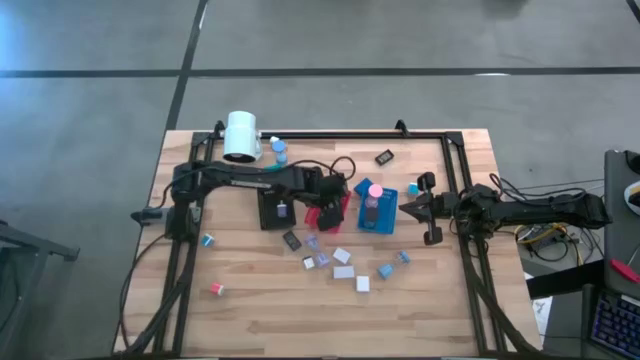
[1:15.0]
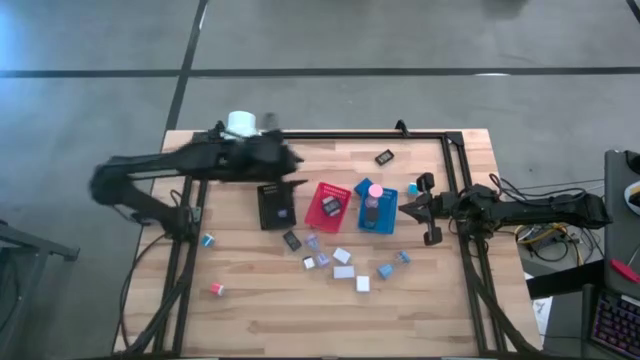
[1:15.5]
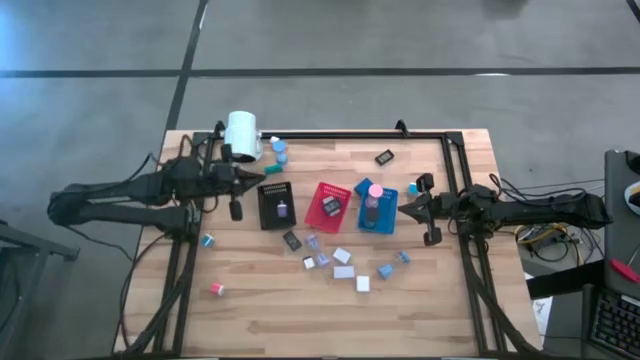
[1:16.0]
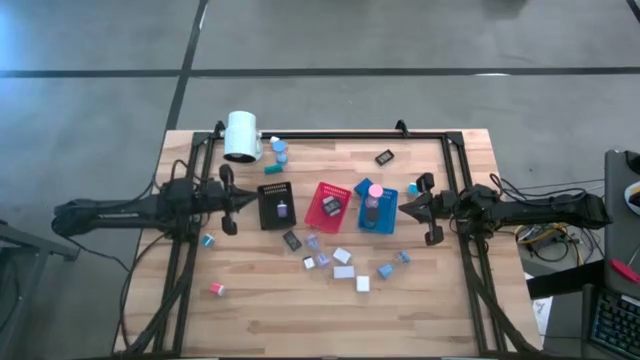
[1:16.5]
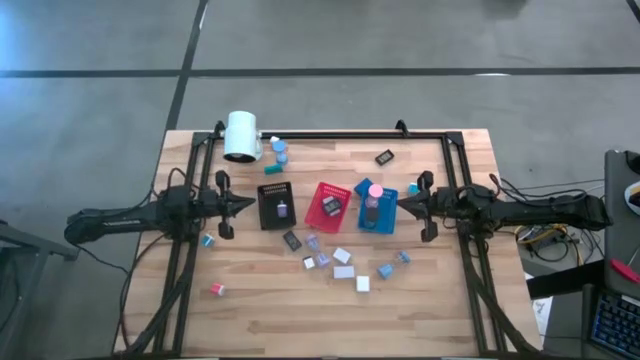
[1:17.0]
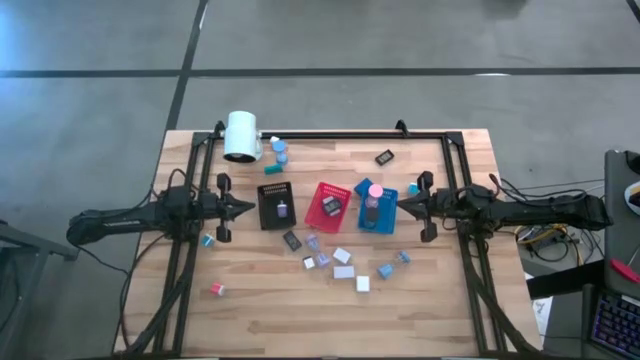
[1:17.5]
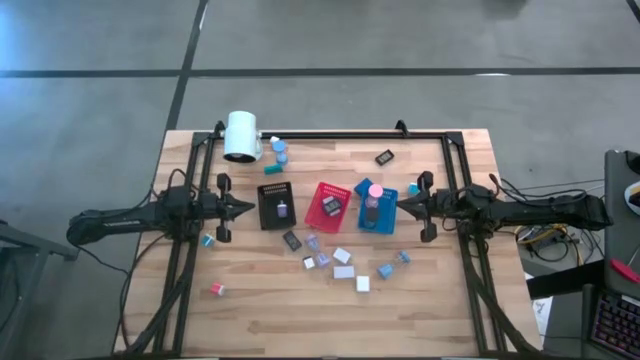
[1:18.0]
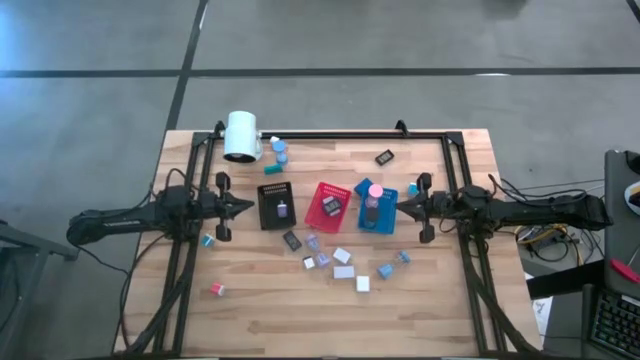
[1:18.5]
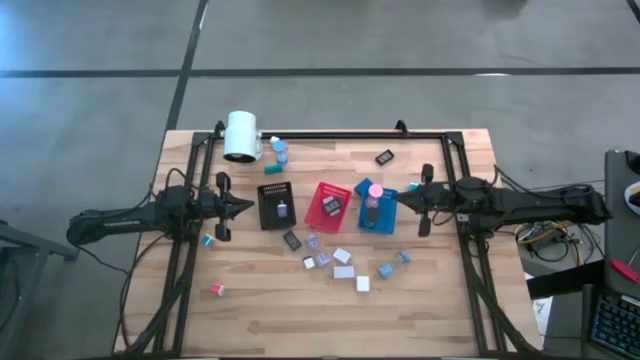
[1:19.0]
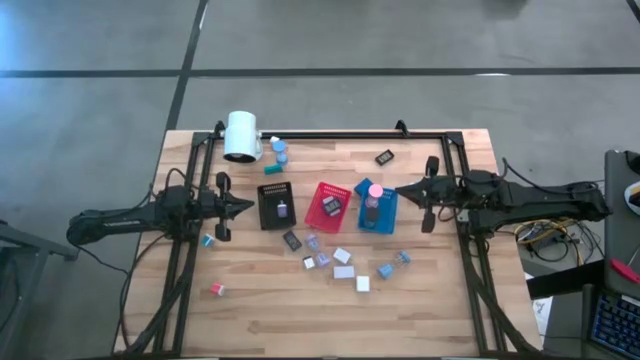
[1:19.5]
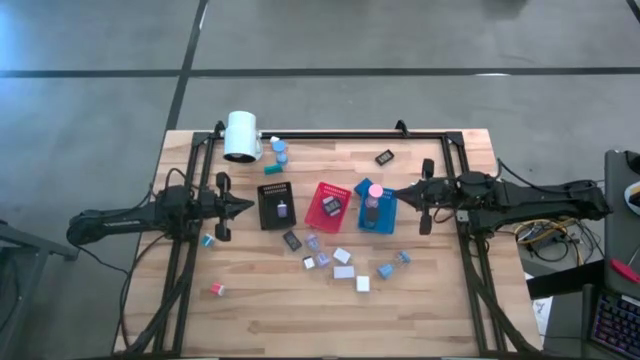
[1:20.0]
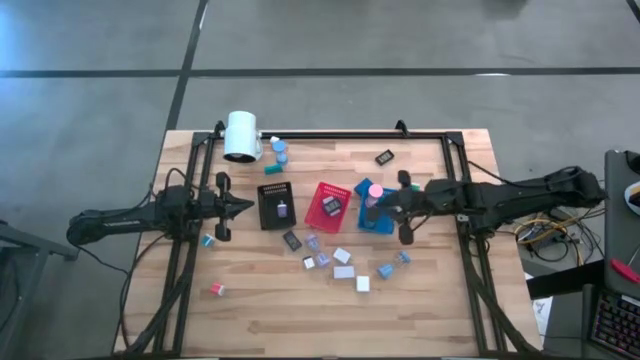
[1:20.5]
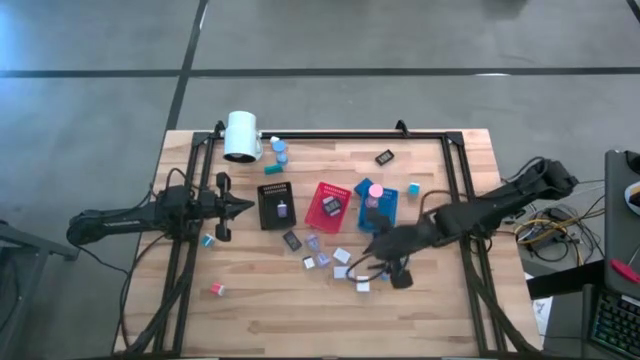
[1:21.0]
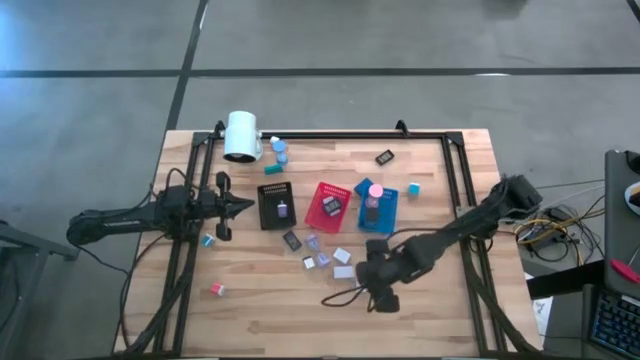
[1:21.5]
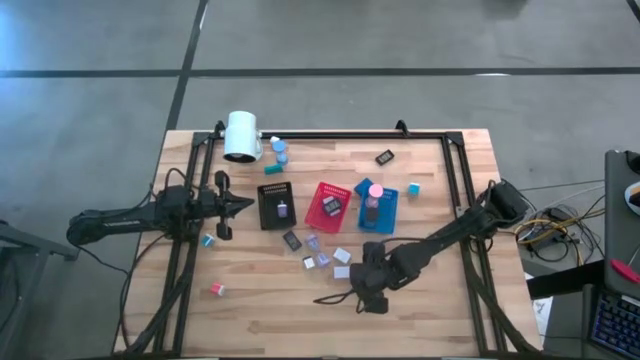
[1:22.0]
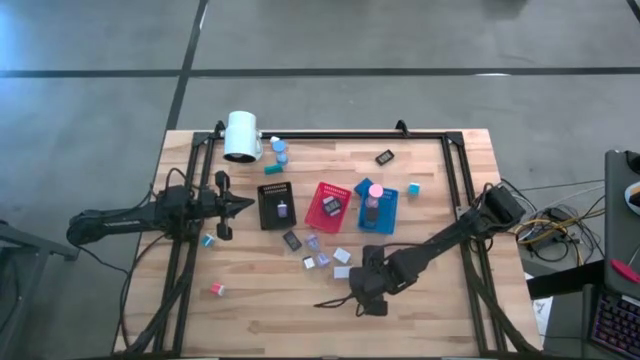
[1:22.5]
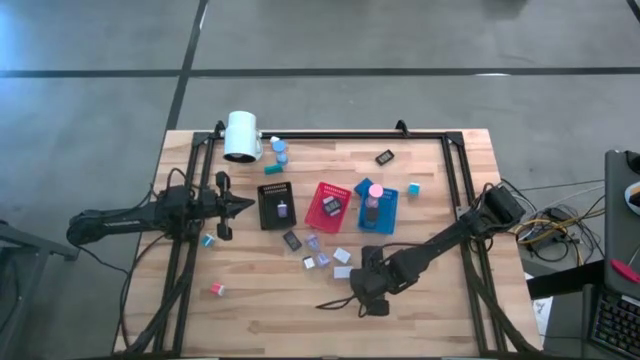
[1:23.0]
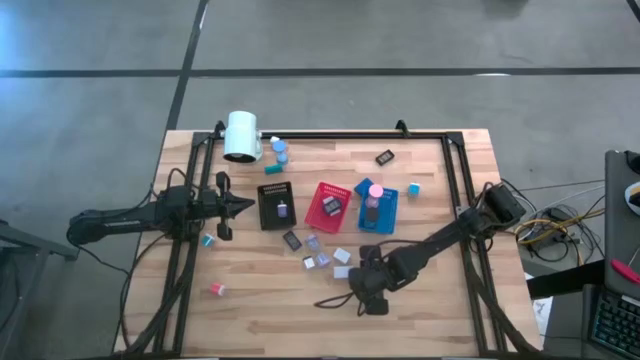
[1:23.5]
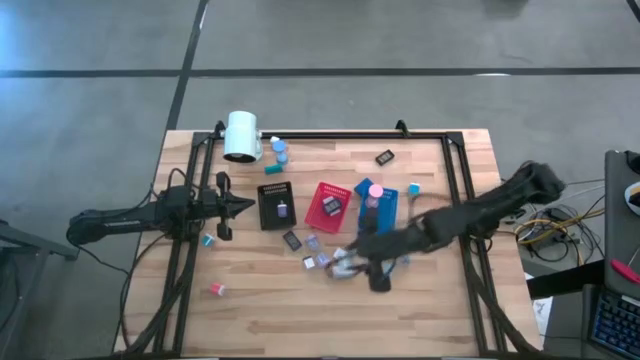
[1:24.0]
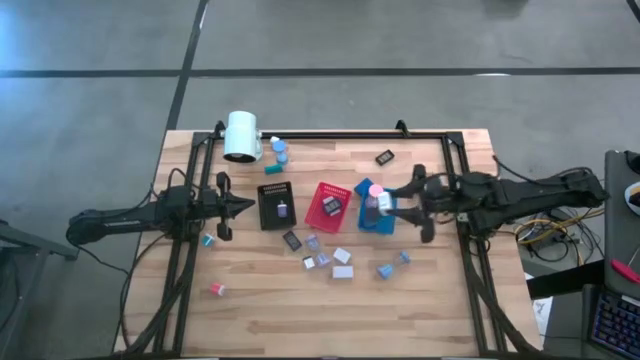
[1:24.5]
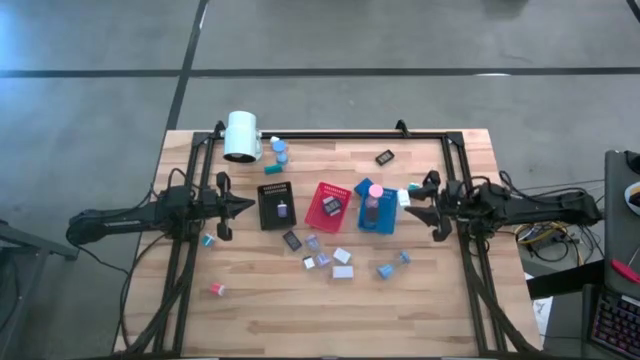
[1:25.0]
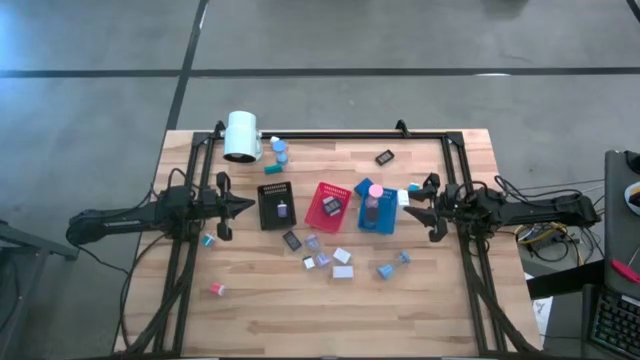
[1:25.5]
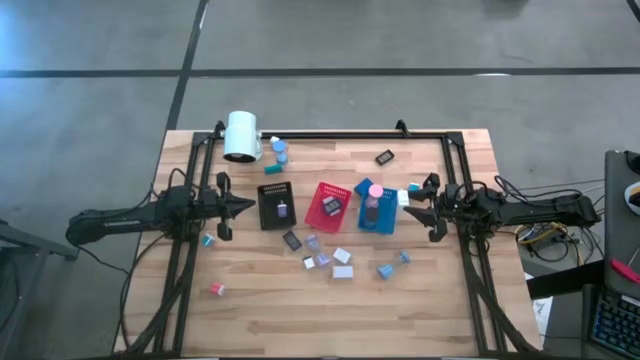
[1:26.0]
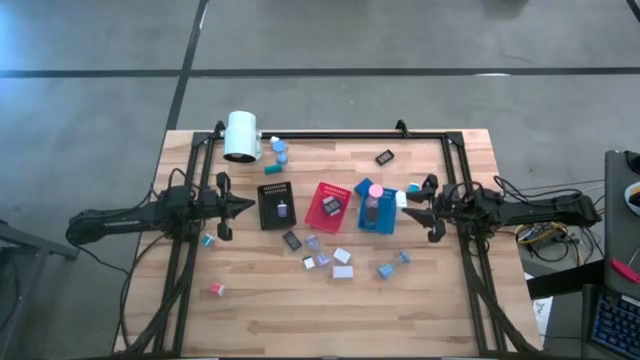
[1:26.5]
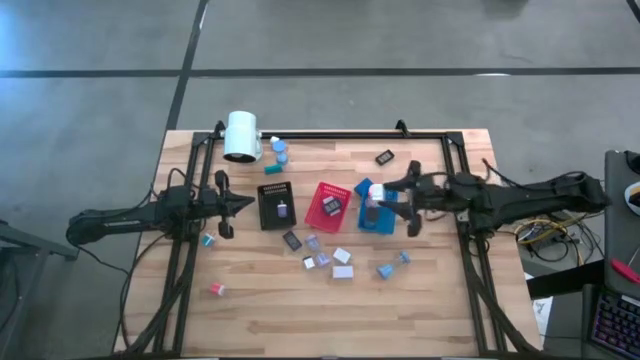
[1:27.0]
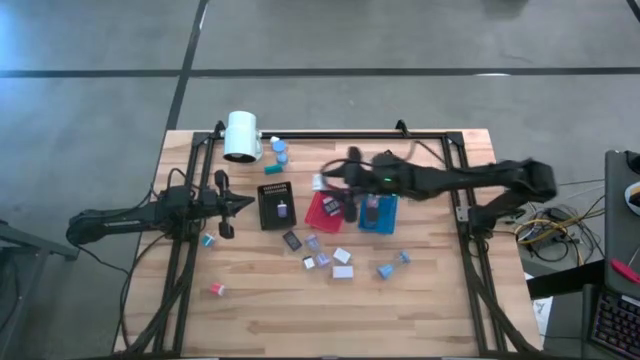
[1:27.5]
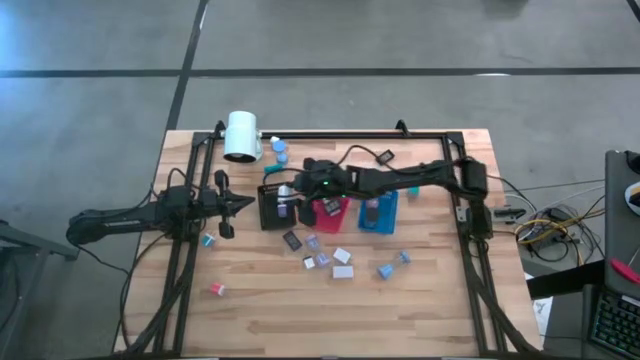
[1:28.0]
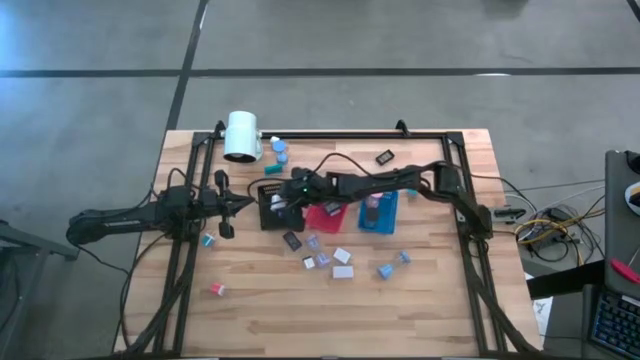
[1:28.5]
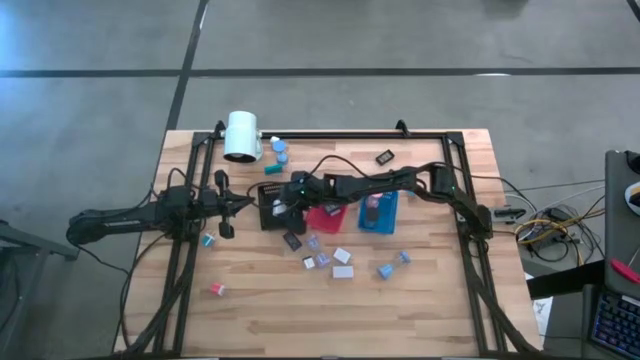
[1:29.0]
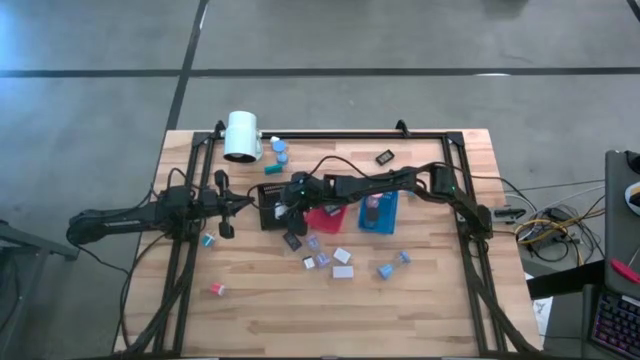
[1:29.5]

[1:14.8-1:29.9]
Task: Pick & Place Office items
Put the bottom white charger adapter into the black bin
